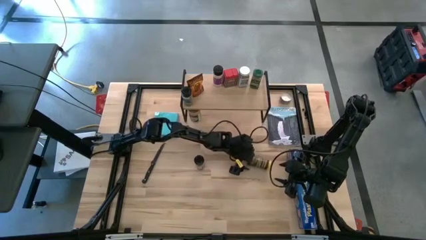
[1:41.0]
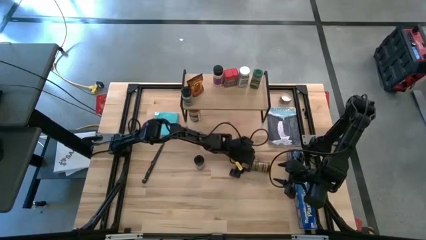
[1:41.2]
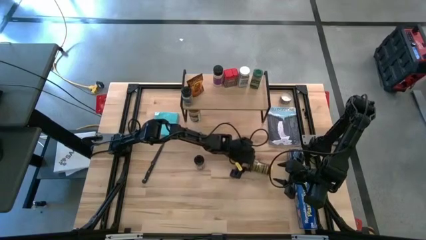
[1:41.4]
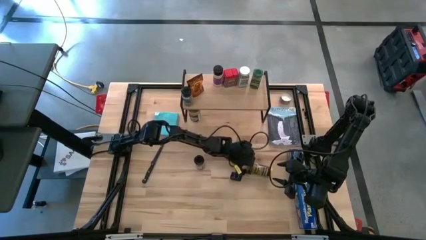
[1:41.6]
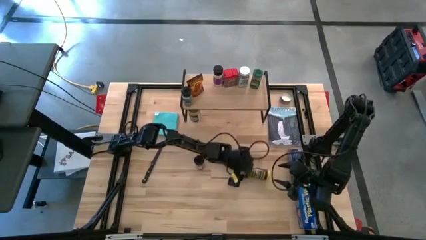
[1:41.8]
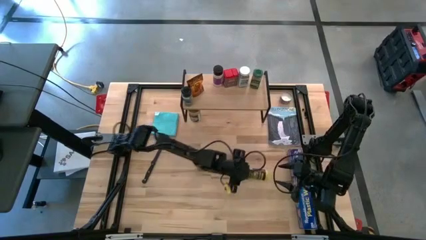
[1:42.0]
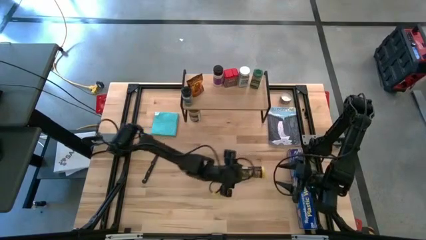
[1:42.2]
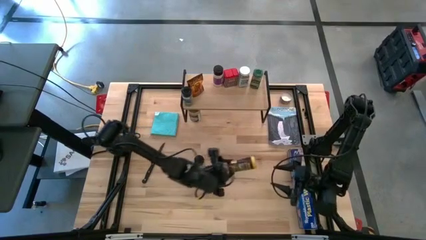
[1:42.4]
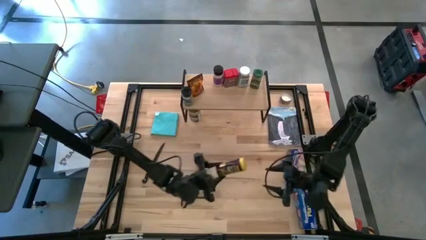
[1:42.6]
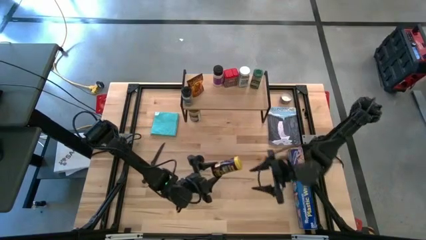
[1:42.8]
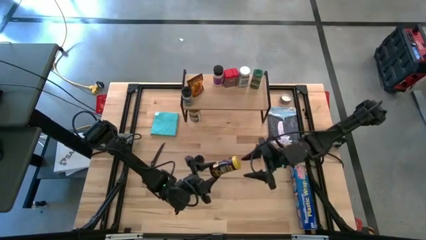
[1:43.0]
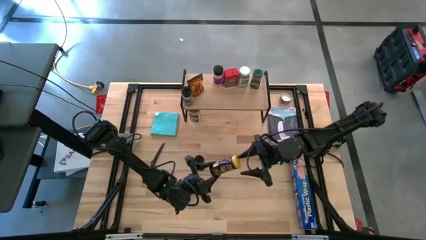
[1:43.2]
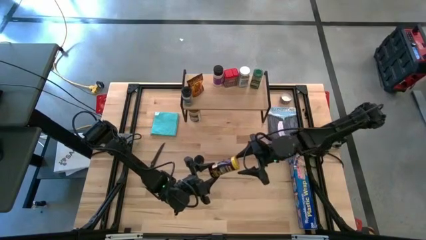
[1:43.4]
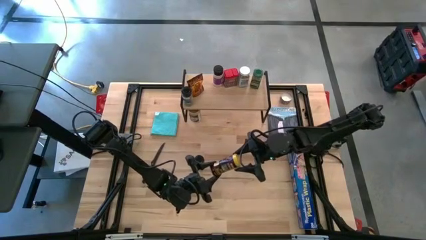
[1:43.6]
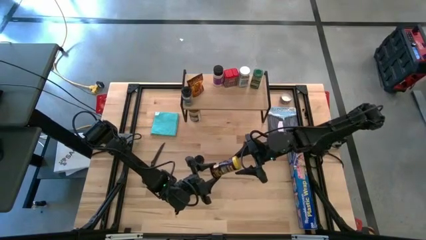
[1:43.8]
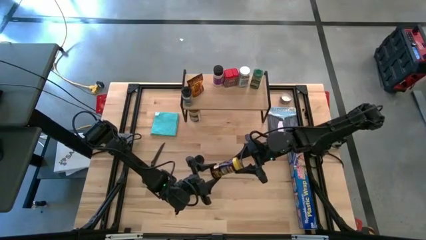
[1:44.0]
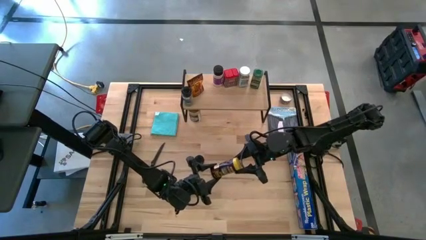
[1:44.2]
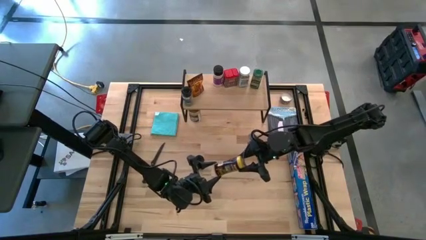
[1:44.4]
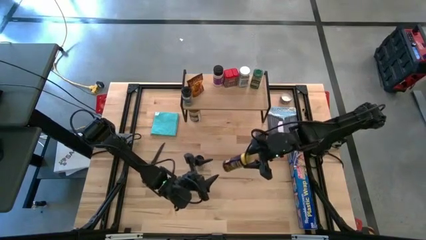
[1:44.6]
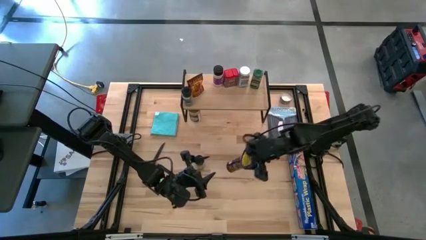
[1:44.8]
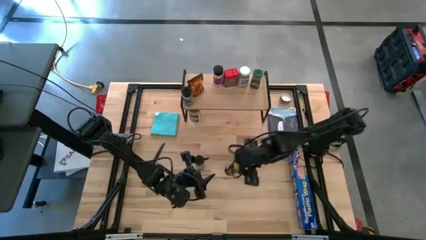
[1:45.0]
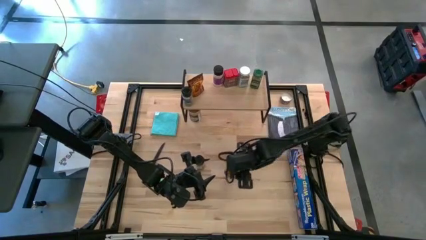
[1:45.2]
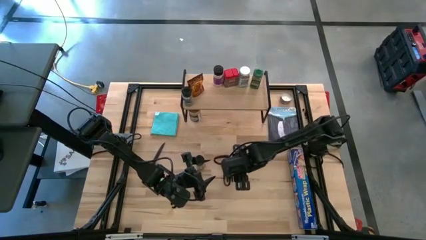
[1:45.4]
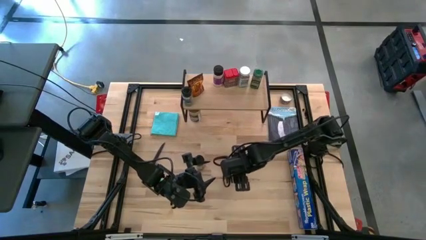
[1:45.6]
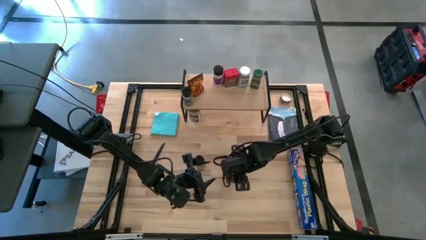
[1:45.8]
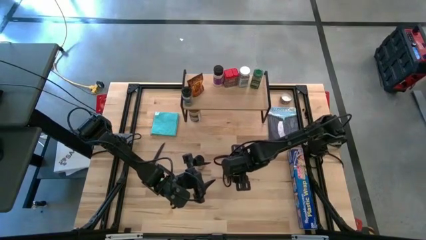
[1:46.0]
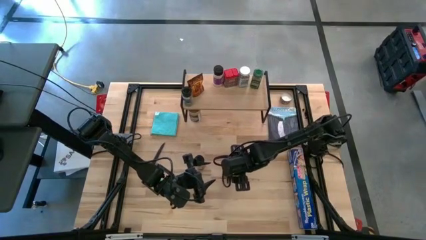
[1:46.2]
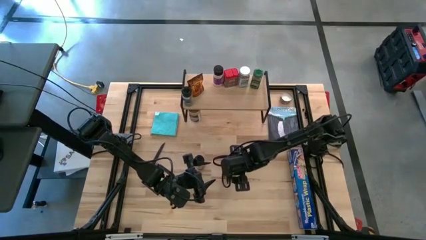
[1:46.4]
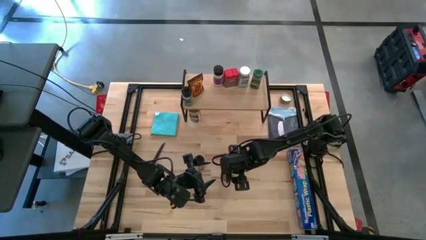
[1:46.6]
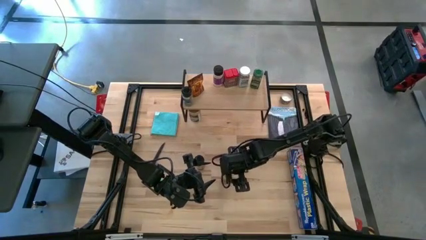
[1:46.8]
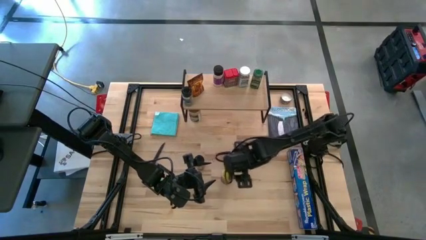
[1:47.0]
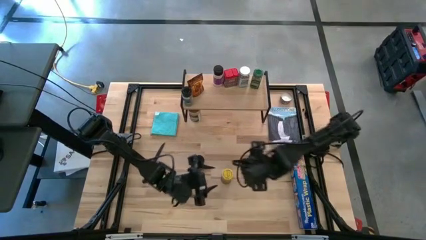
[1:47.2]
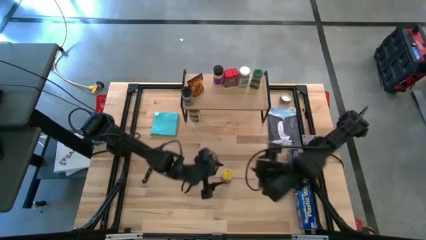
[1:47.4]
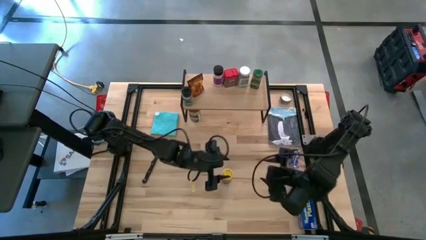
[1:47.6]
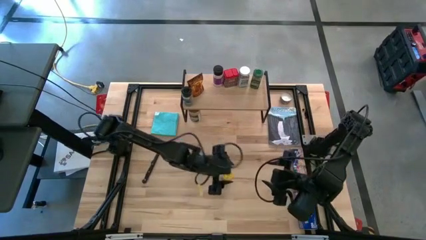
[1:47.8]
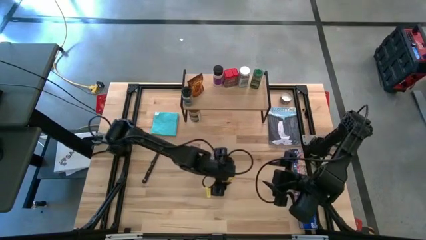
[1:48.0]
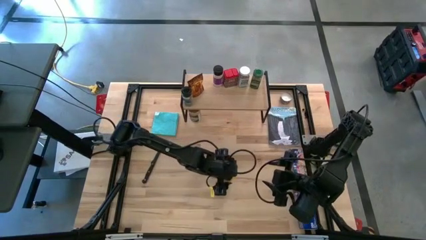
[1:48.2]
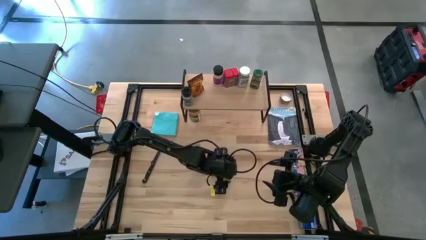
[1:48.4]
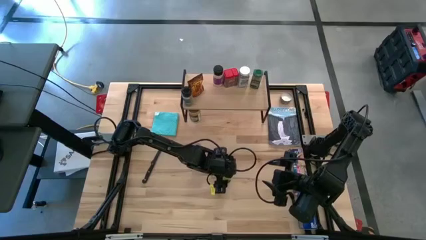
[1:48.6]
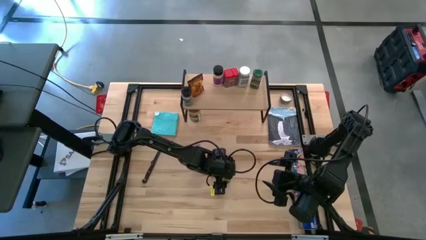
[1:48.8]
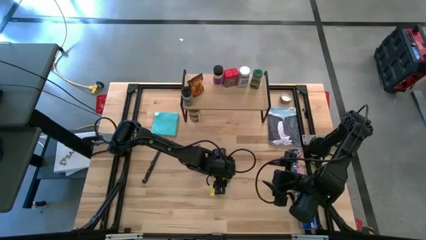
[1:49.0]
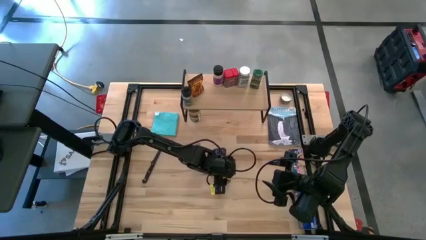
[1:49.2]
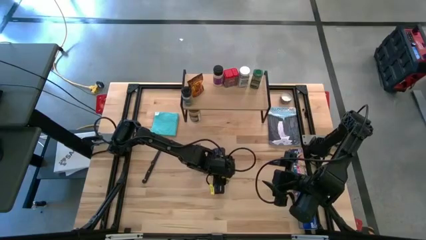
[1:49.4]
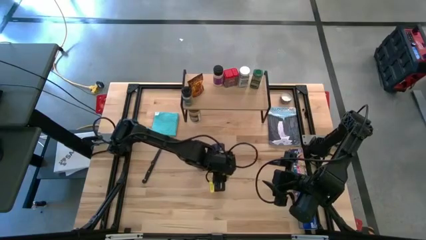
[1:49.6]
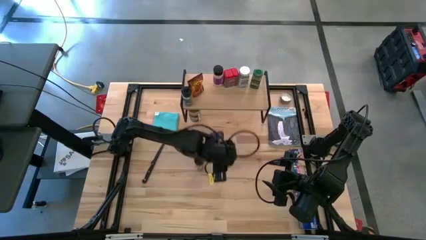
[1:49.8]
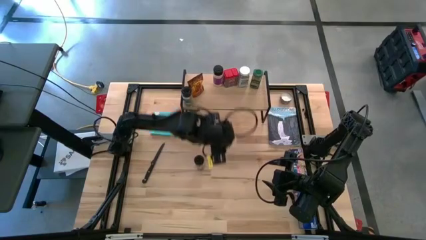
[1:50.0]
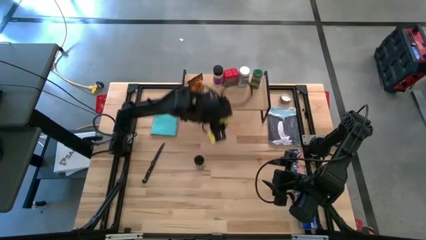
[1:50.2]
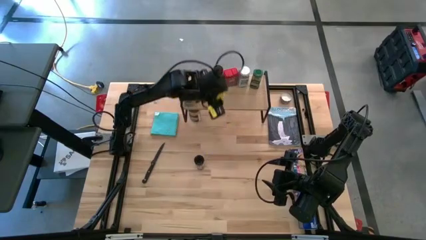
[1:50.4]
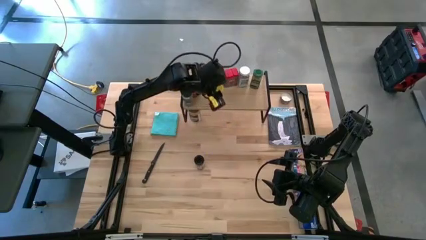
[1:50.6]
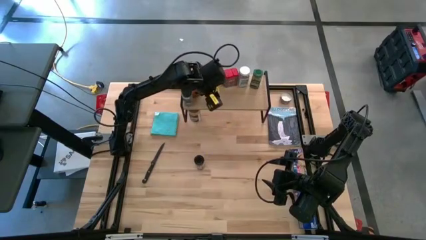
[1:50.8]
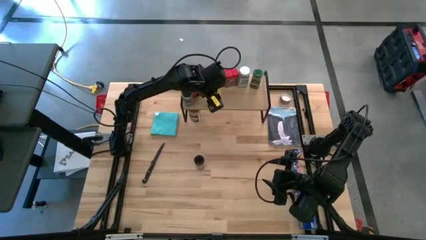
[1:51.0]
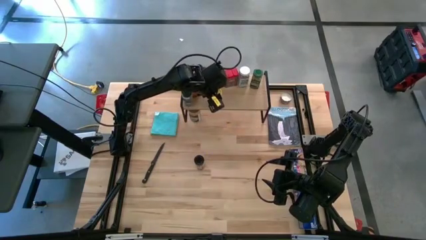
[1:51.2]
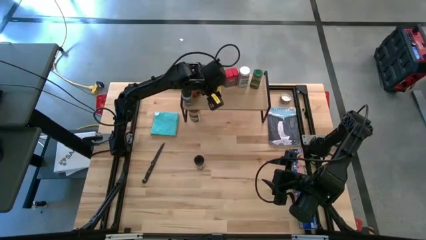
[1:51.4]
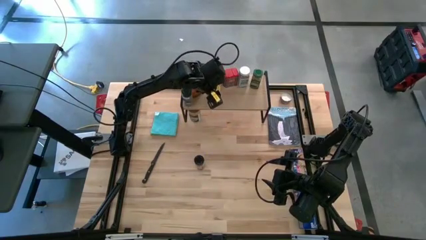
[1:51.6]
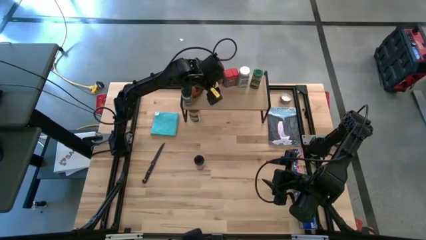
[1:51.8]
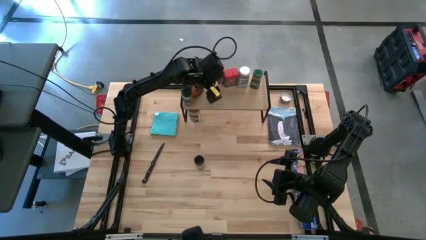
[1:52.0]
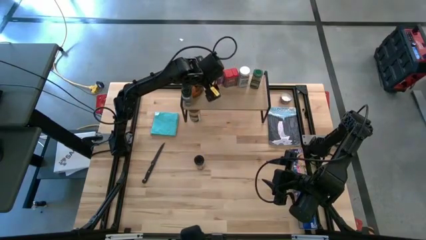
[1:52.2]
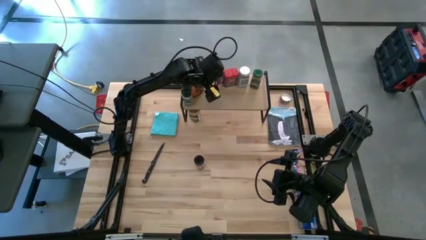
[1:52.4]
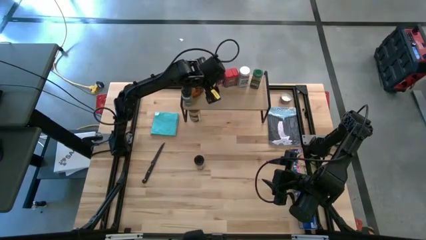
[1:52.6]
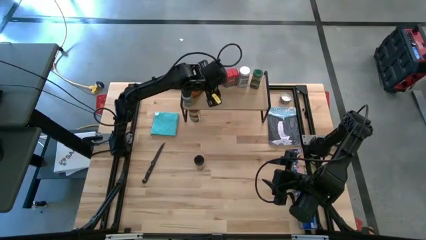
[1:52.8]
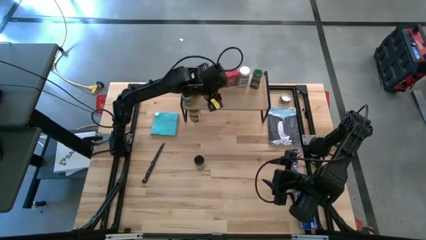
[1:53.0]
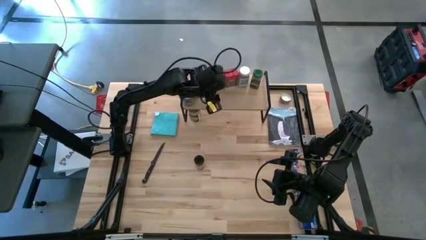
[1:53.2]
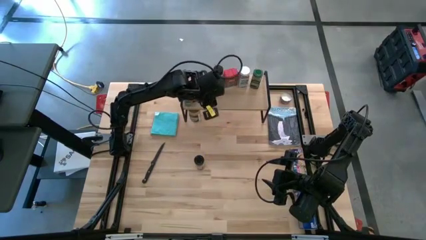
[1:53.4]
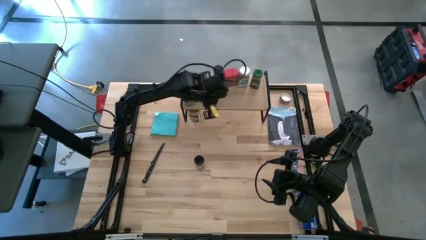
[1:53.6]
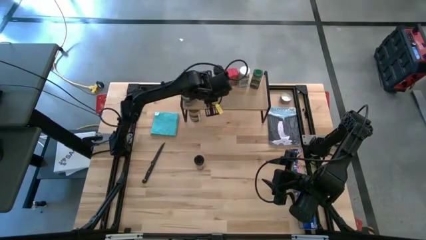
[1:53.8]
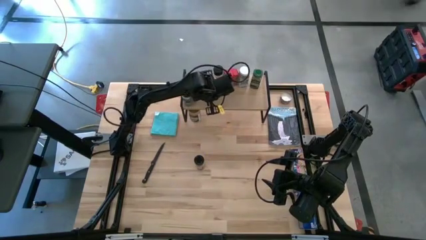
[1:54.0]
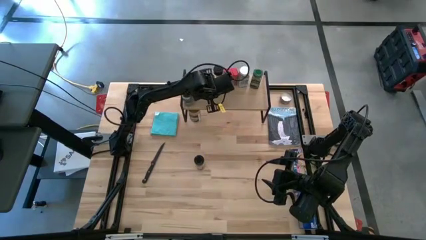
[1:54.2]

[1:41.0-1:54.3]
Task: Shelf spices
Put the yellow seasoning bottle on the shelf
